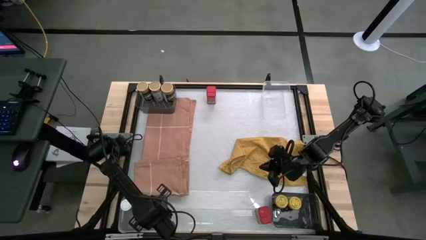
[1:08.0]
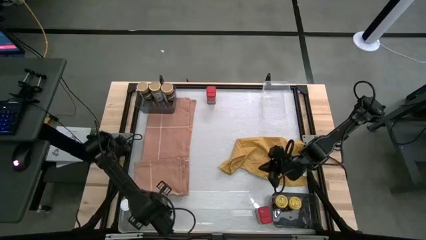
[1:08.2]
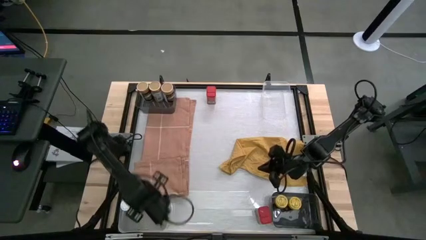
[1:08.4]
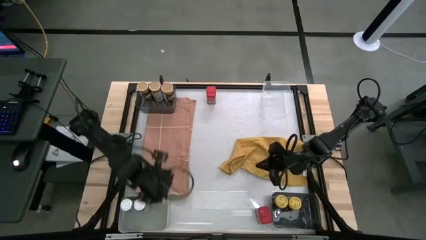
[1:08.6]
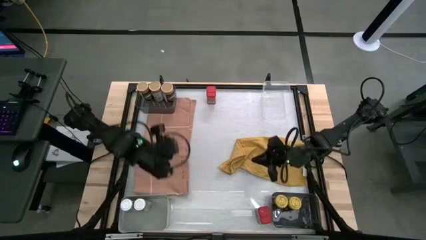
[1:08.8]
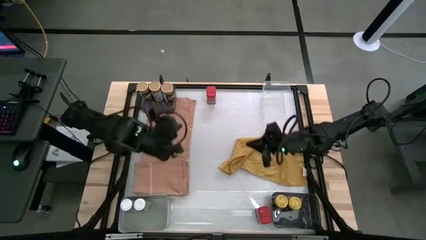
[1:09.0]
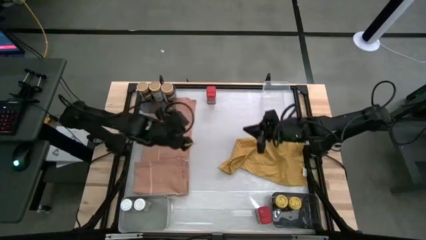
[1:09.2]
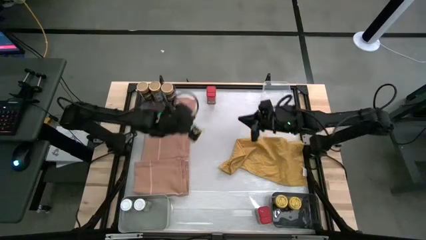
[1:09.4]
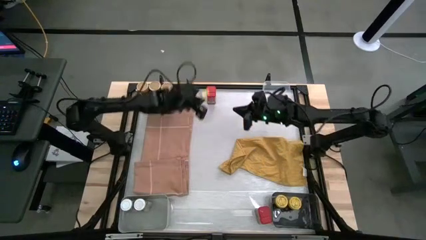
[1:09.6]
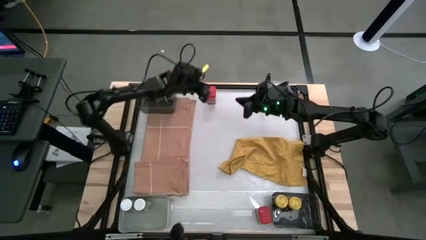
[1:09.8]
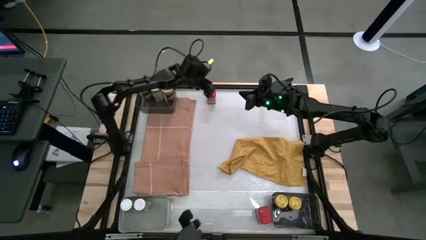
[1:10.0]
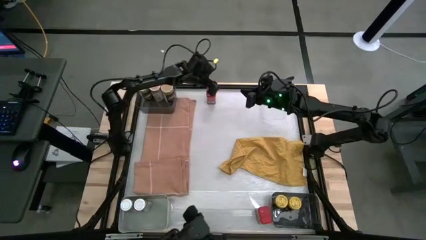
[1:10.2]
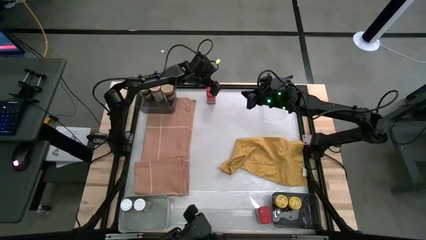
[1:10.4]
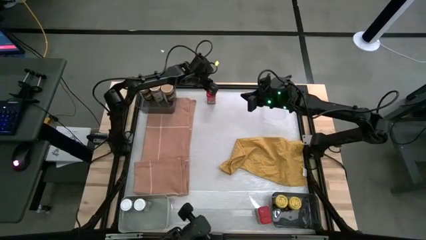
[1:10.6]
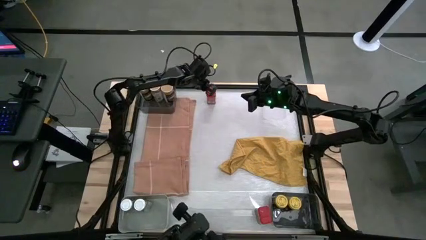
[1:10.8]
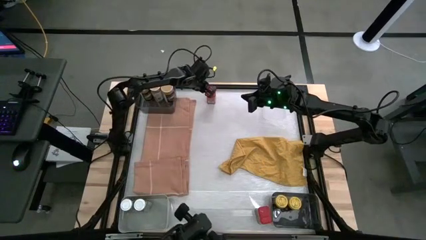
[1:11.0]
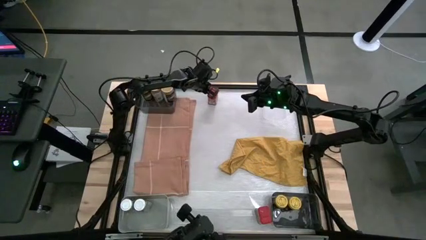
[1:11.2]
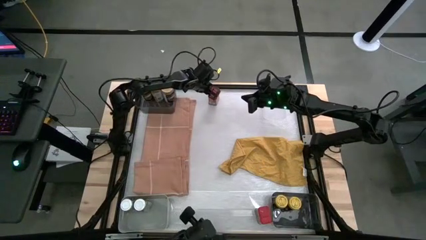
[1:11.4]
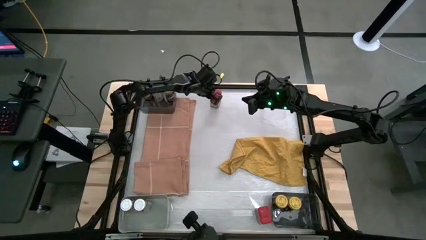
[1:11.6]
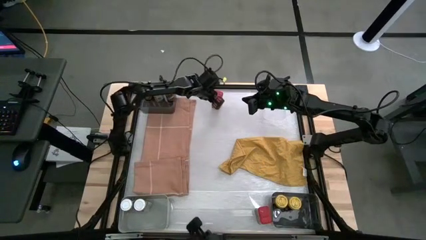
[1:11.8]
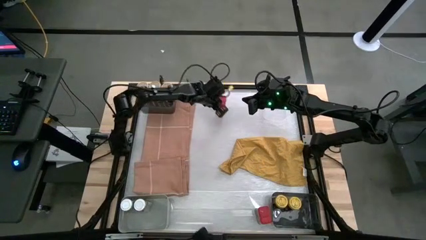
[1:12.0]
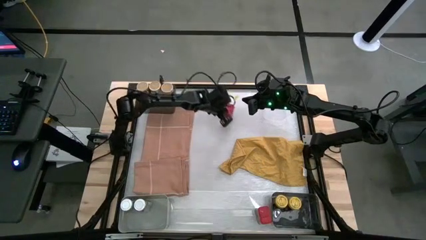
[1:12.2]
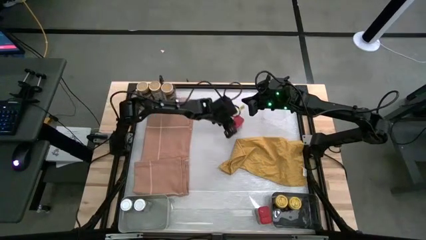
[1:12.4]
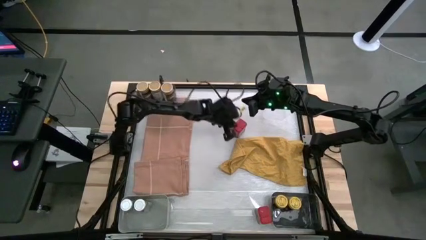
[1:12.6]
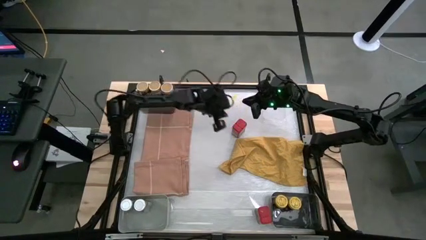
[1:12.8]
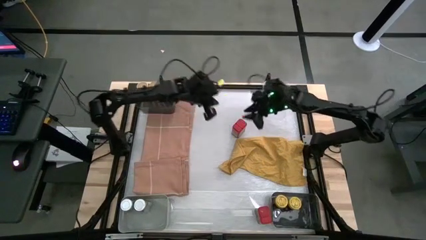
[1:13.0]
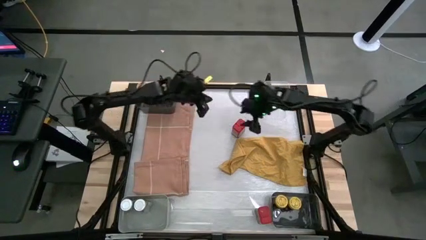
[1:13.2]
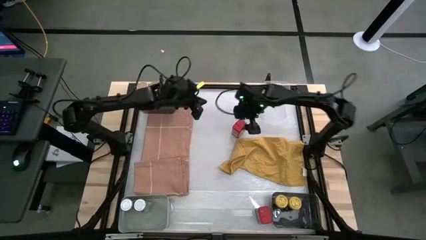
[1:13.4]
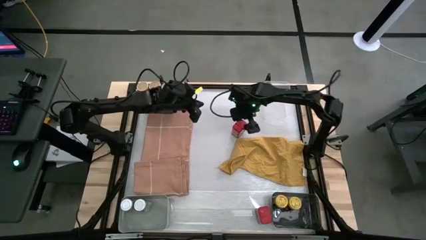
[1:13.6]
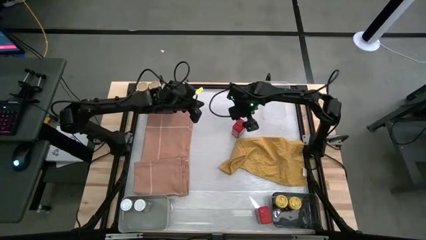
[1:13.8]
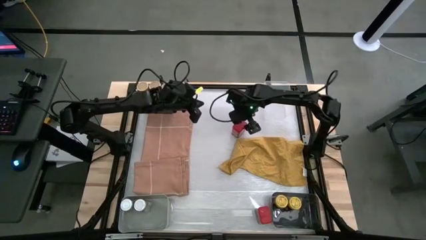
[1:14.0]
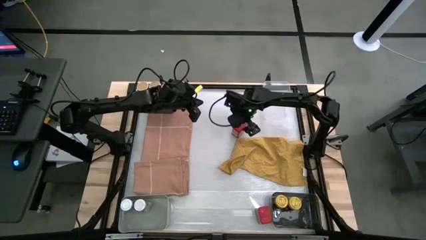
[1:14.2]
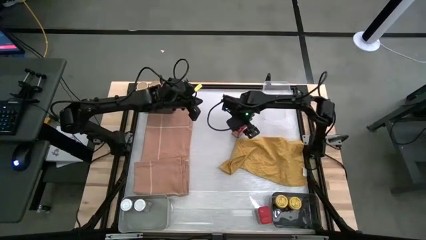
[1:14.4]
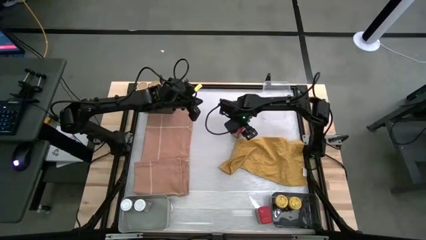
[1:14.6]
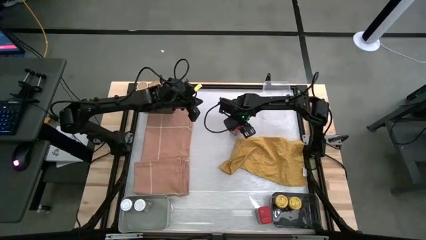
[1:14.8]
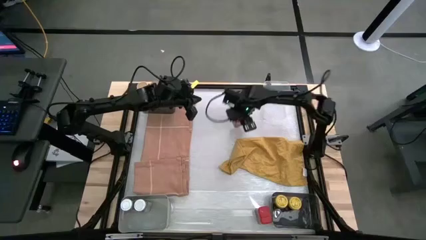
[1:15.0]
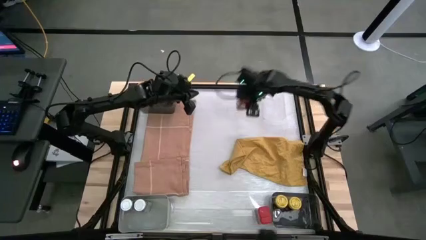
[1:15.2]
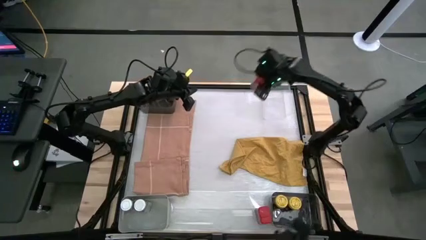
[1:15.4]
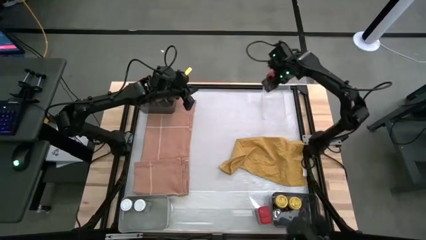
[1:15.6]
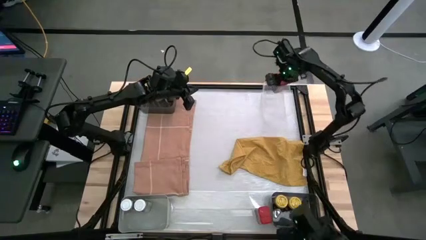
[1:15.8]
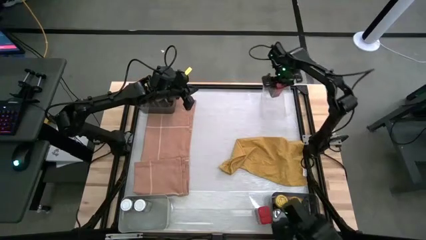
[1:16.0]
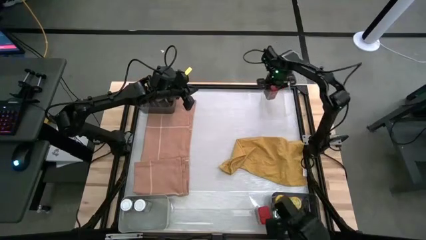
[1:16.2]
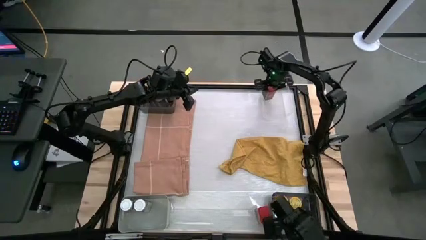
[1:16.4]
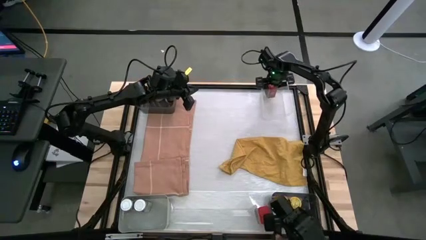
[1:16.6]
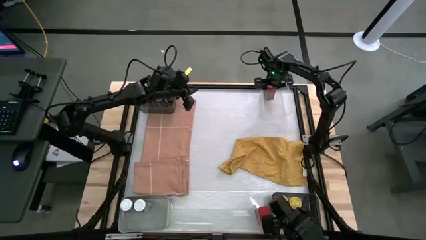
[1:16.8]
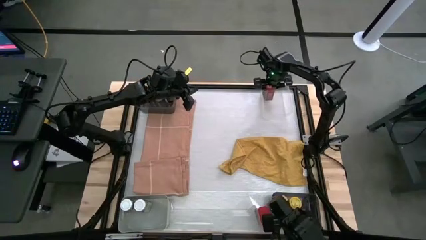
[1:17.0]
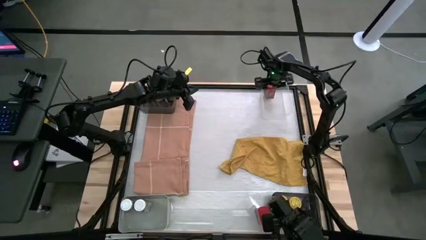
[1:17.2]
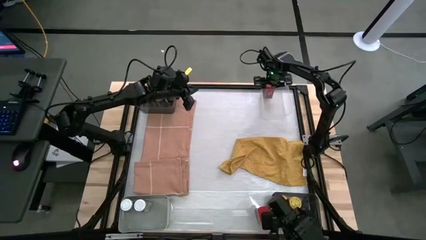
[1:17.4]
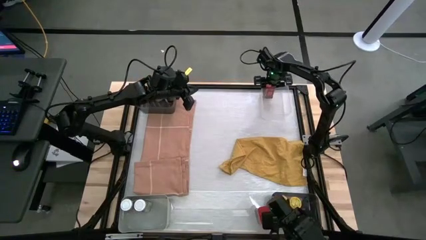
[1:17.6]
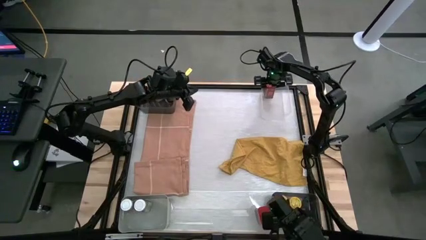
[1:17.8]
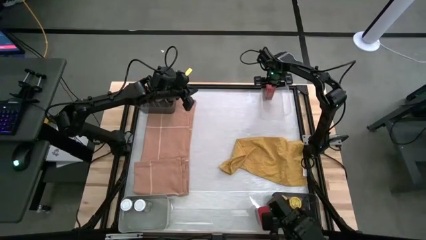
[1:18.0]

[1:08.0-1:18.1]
Task: Sort spices by type
Put the top red seasoning can into the transparent bin

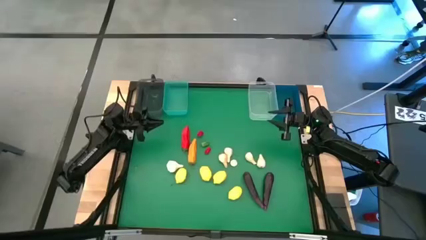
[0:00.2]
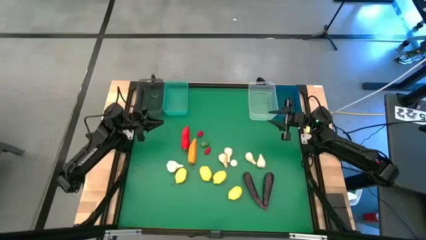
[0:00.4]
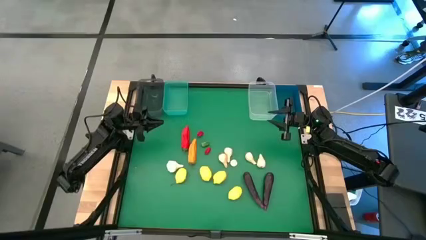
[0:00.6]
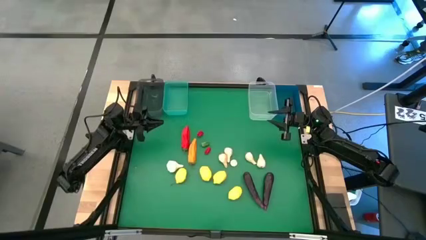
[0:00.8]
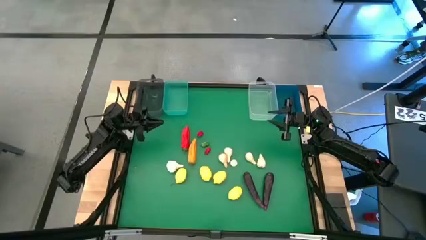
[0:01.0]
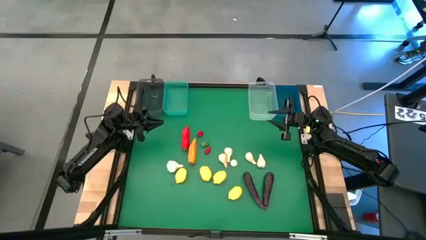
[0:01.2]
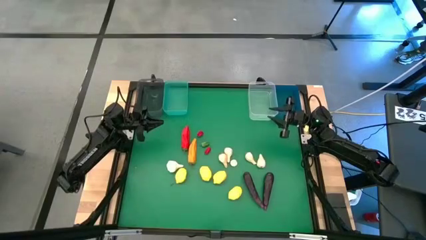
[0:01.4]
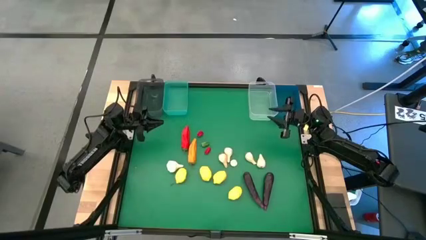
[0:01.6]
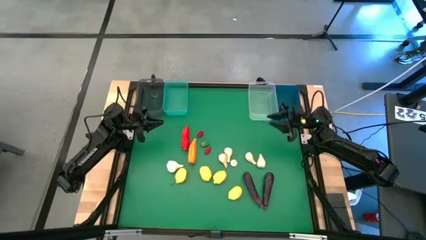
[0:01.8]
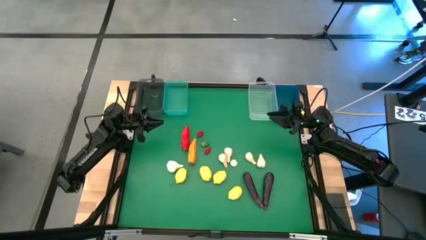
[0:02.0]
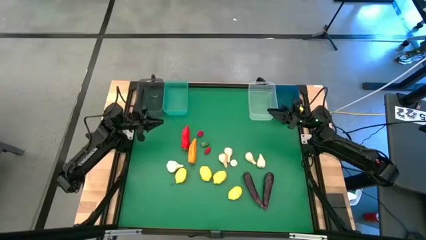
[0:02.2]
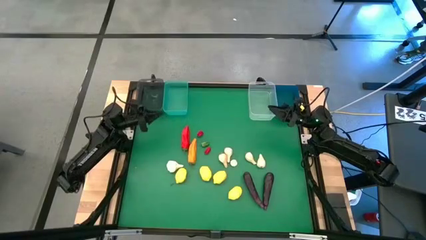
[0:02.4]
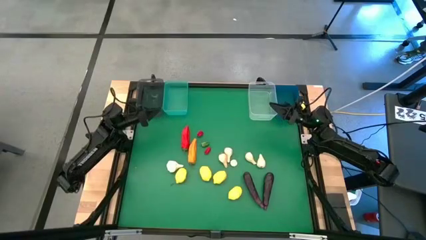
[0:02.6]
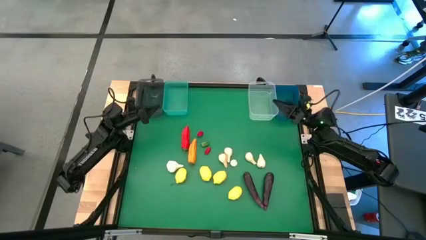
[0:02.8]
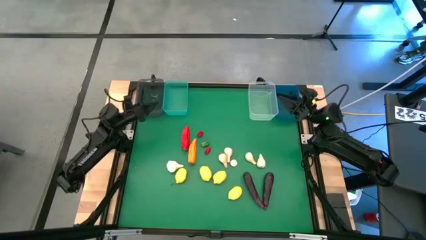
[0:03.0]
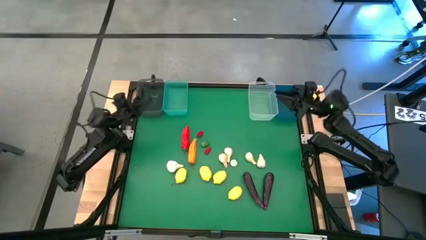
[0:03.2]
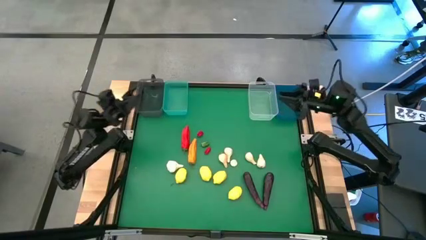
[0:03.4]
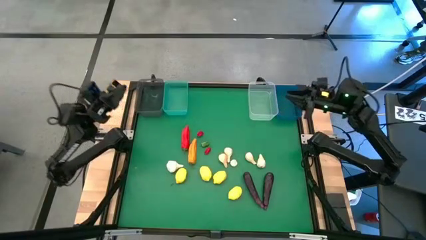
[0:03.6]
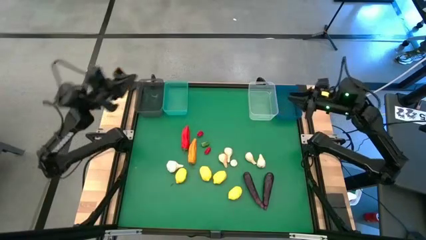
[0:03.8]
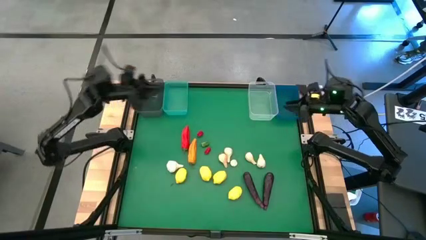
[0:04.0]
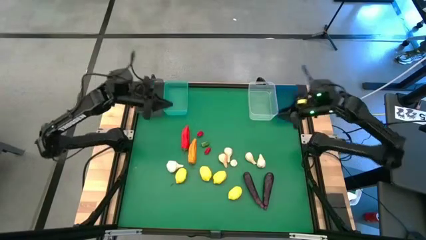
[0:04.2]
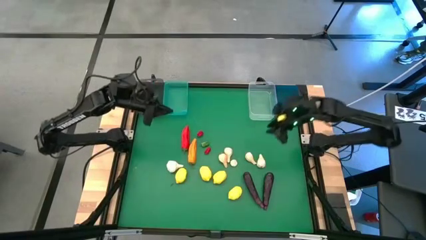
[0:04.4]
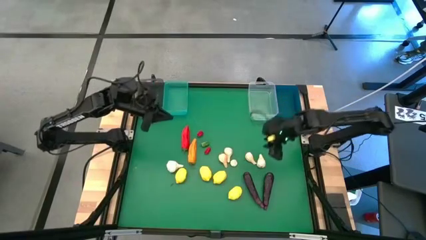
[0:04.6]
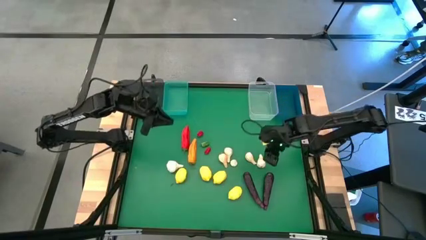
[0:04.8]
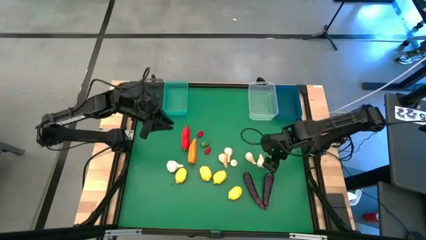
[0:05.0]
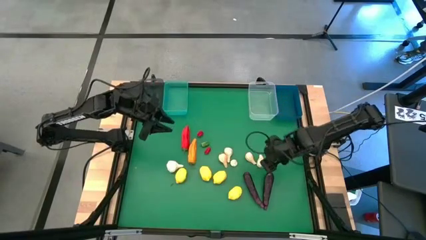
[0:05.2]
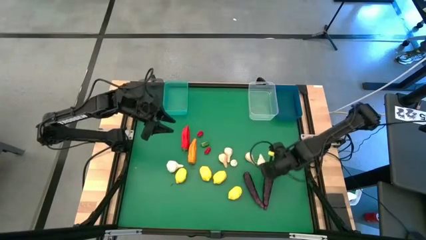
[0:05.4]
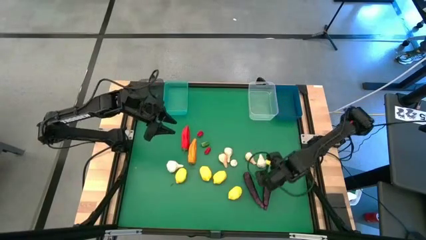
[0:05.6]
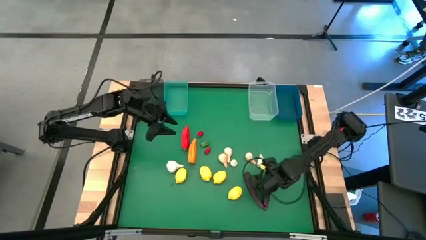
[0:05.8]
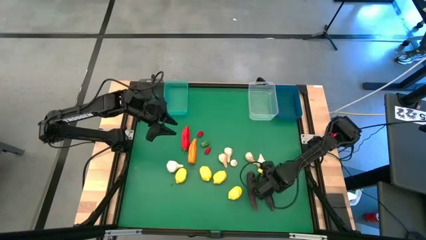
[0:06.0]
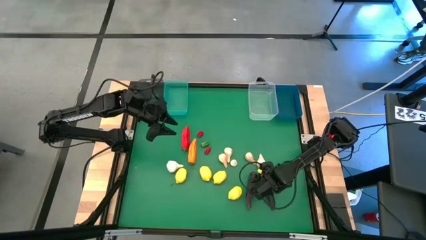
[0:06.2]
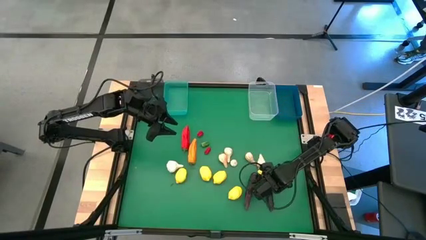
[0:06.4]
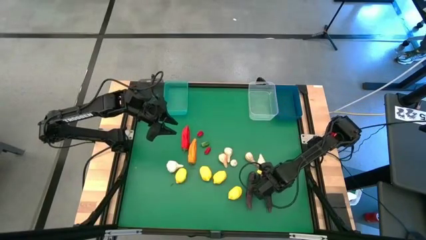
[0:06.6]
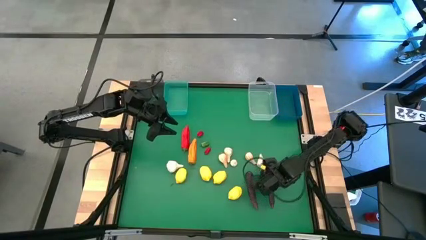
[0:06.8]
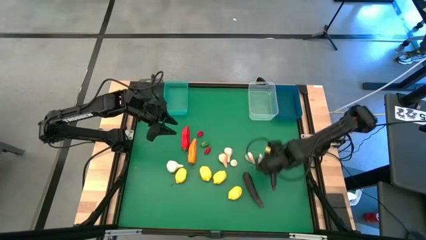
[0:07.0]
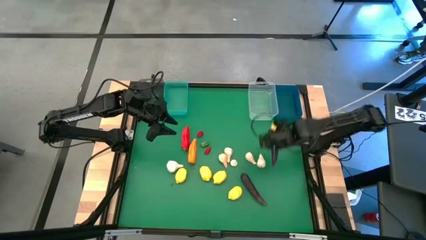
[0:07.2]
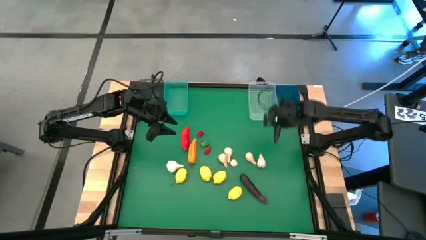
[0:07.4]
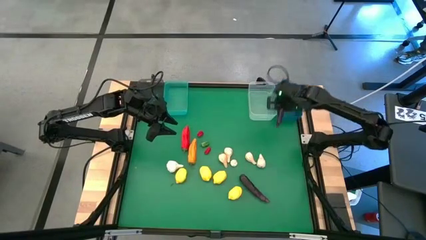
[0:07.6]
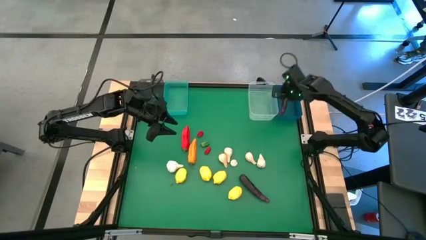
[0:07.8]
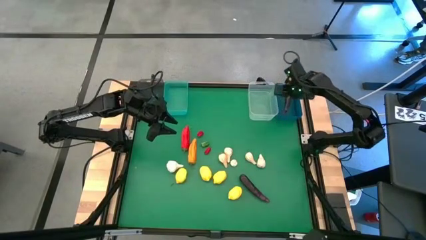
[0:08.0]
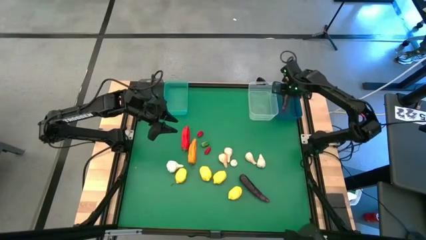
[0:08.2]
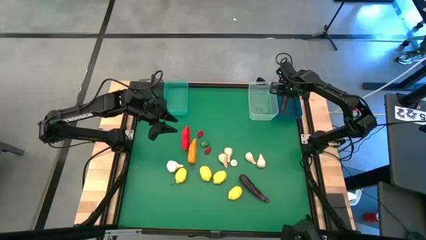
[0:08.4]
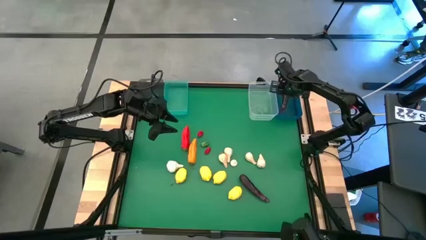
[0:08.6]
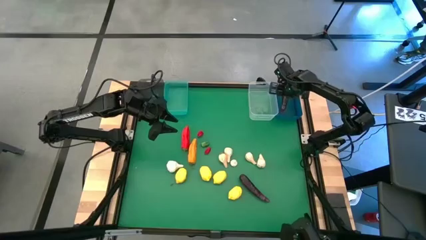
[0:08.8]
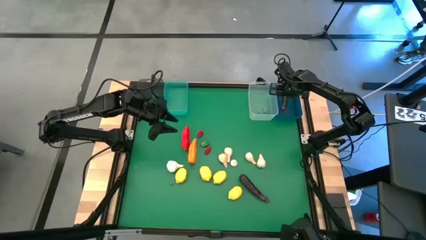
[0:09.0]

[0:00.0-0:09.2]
Task: Sort produce into baskets
Put the right eggplant into the dark blue bin
